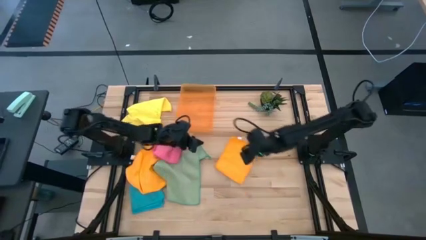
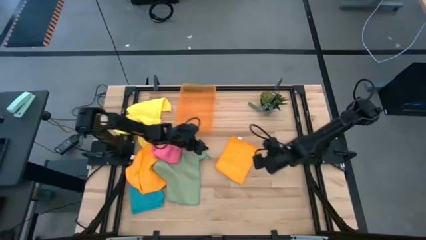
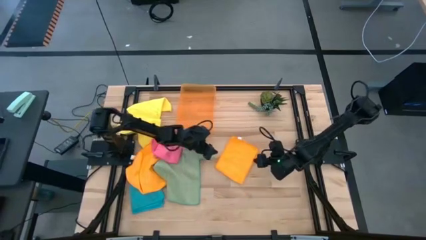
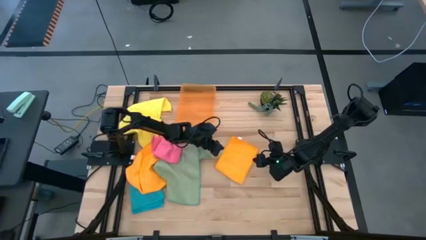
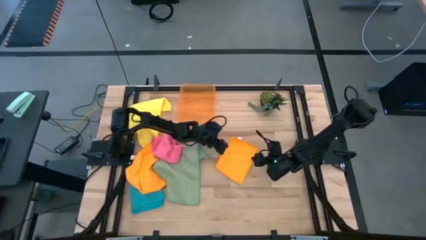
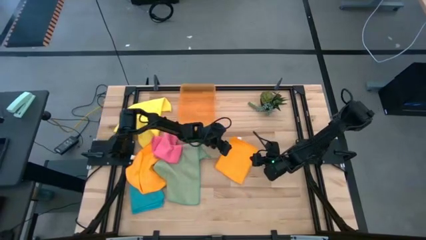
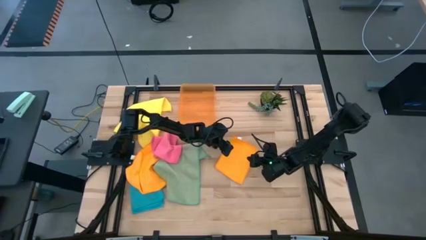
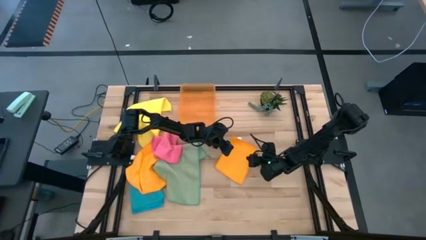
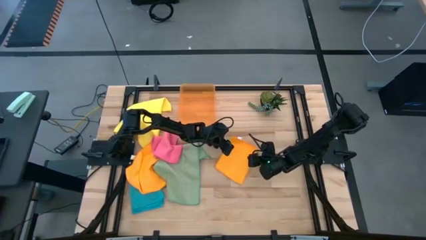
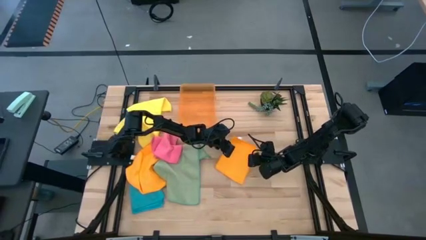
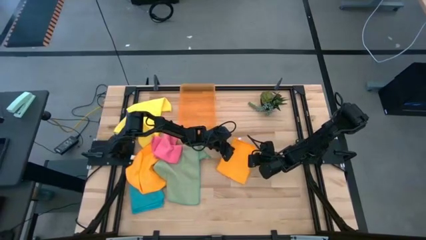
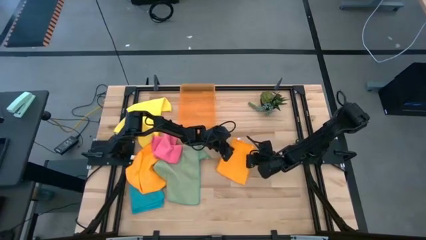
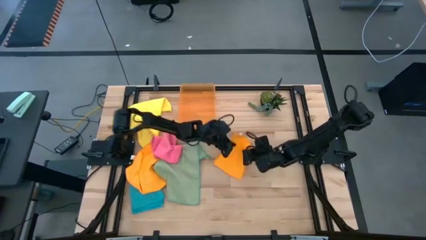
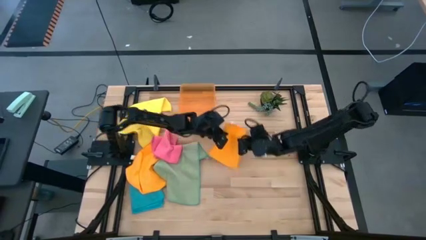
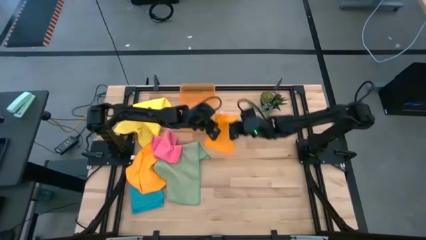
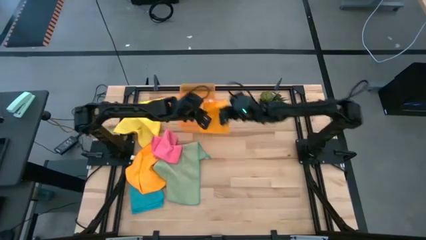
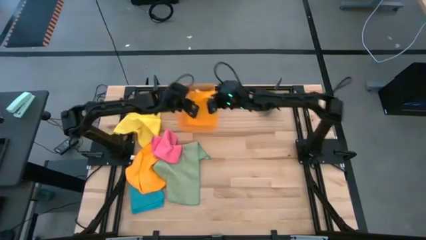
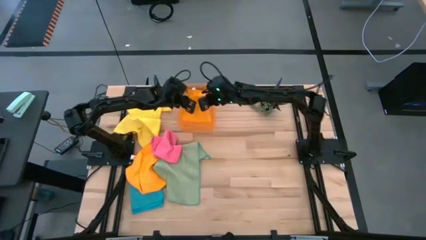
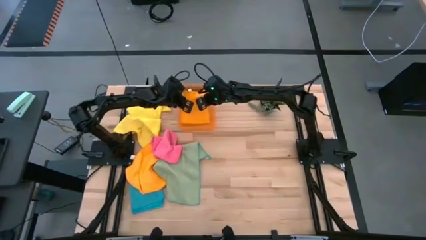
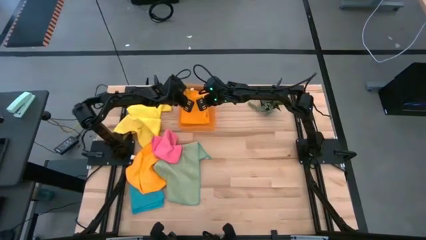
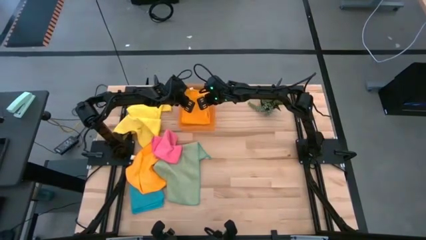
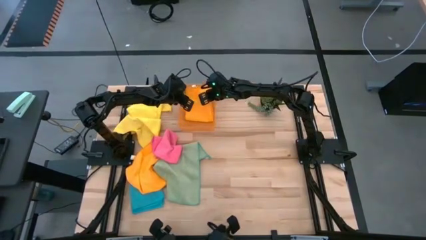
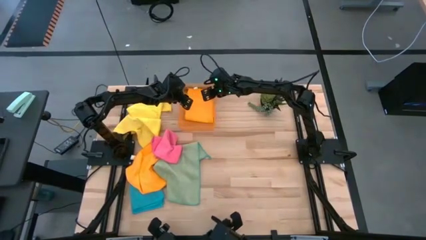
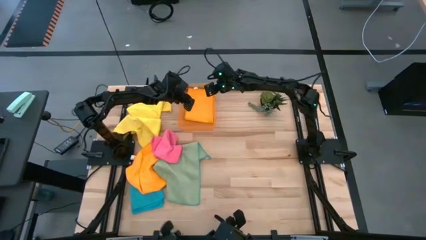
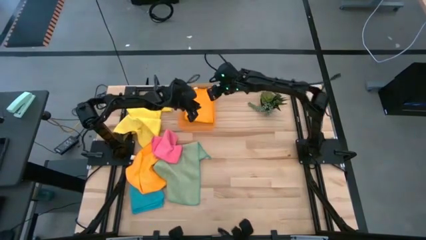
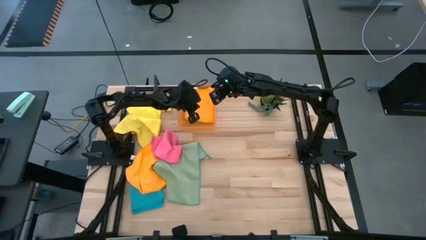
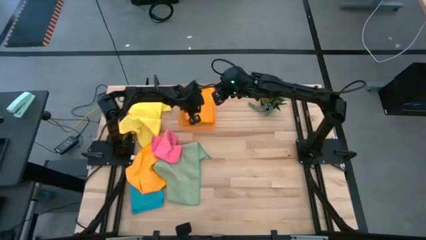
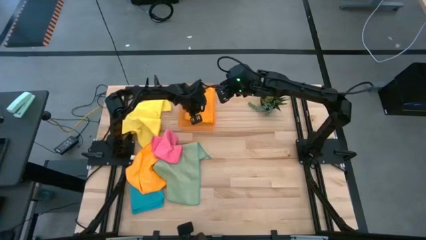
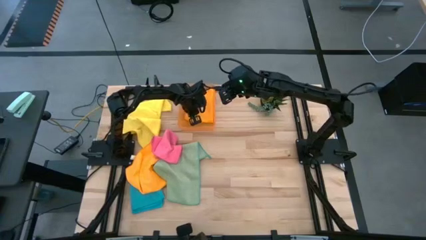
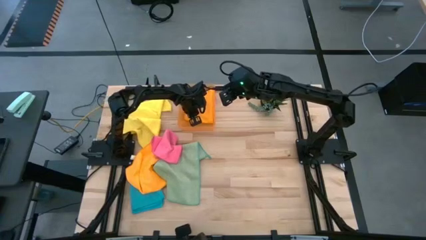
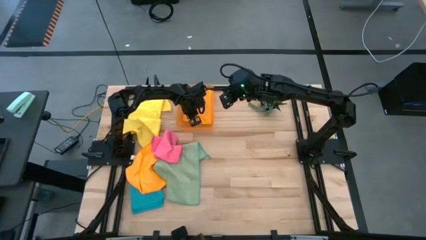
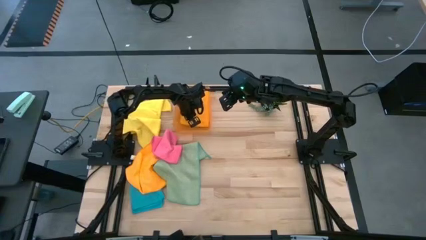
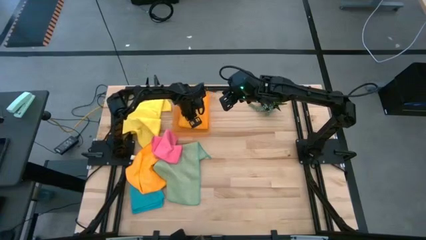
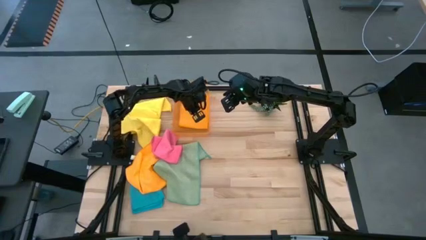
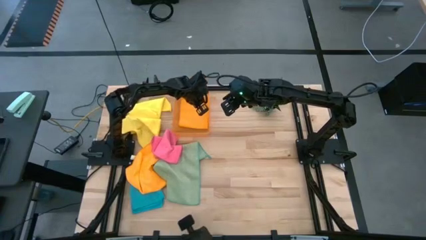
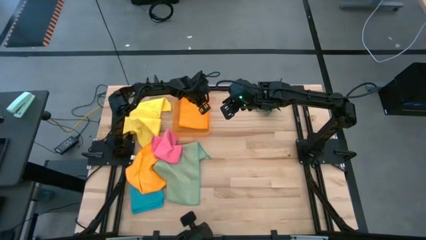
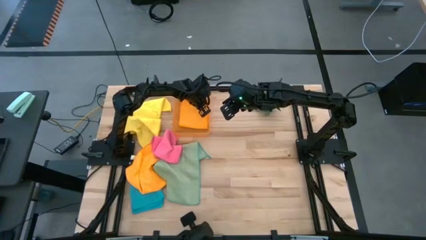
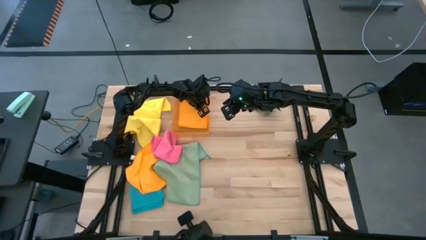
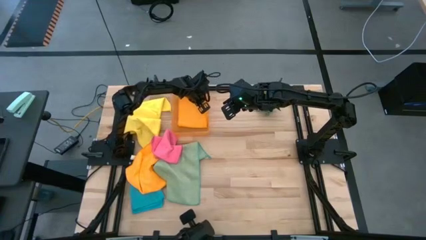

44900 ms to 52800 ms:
Task: Fold microfiber towels
Put the right orange microfiber cloth into the orange bin

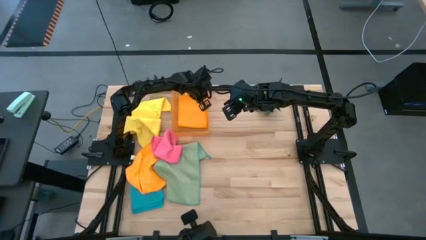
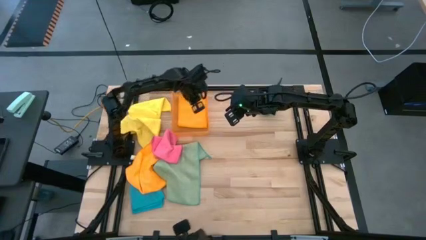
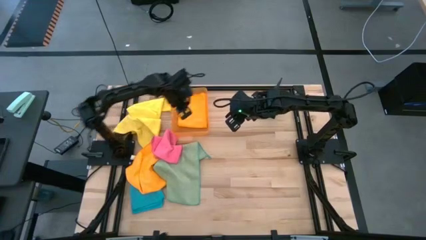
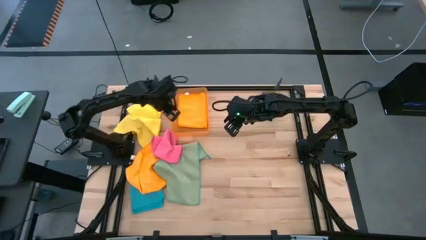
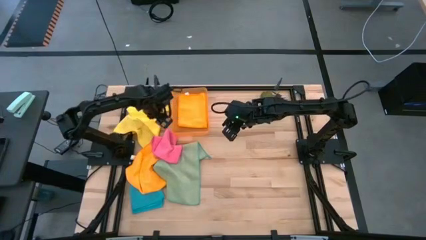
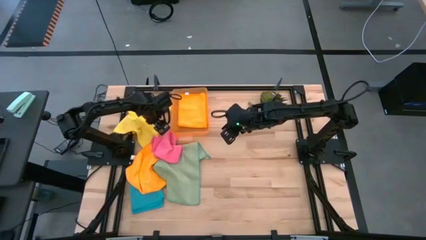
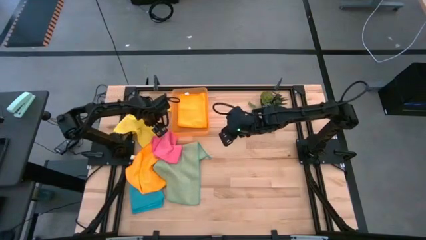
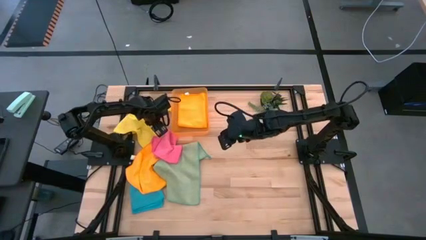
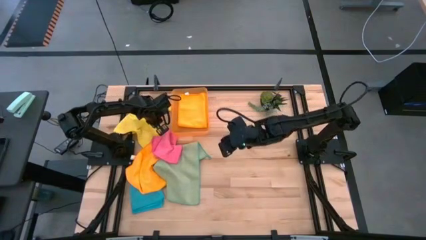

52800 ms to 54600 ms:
Move the yellow microfiber cloth to the center

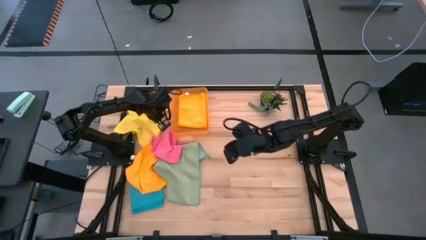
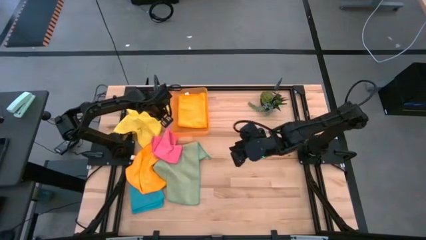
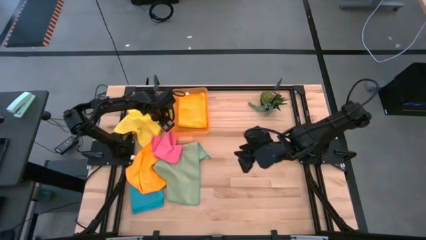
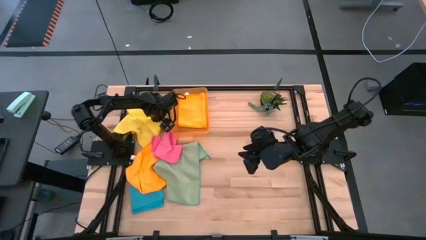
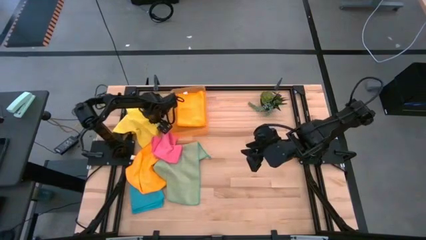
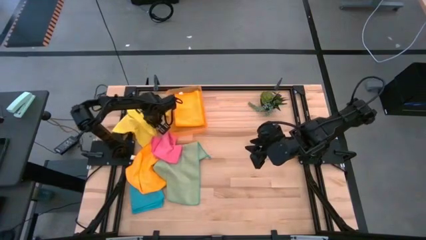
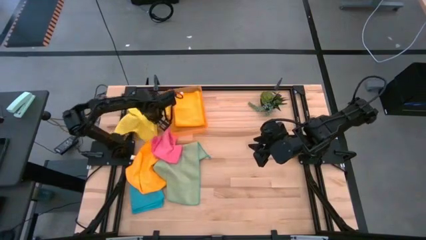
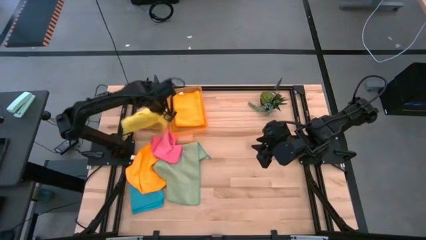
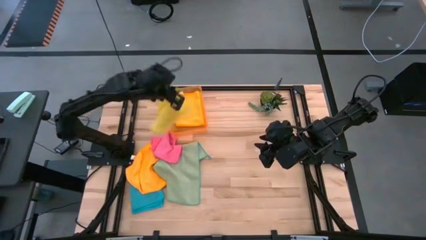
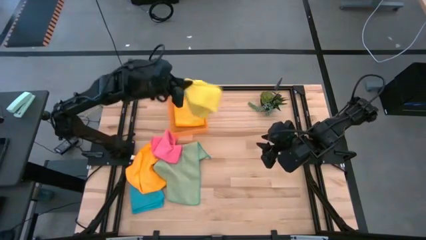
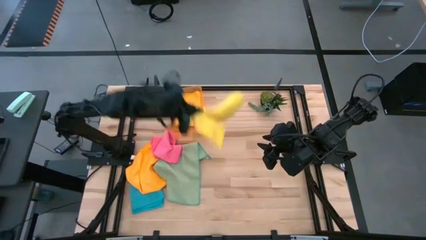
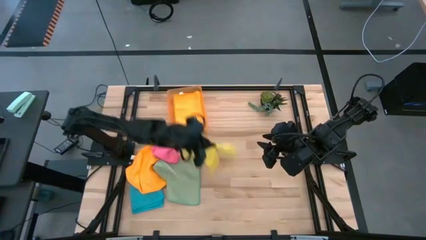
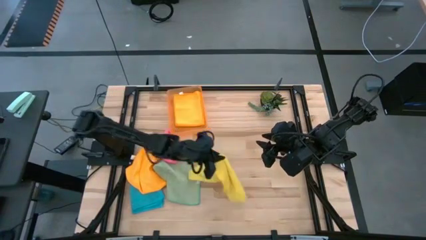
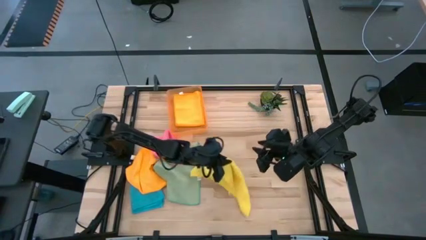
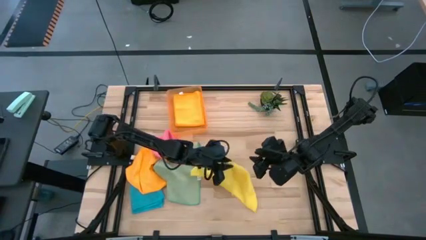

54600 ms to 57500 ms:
Move the yellow microfiber cloth to the center

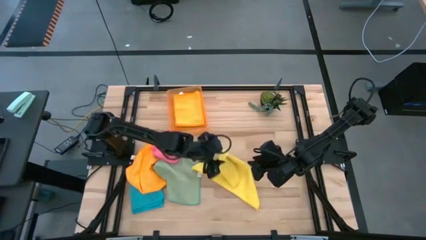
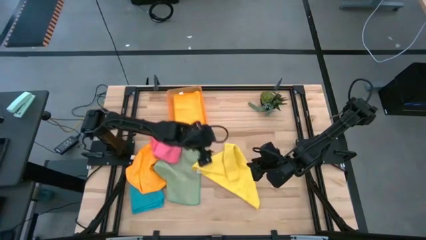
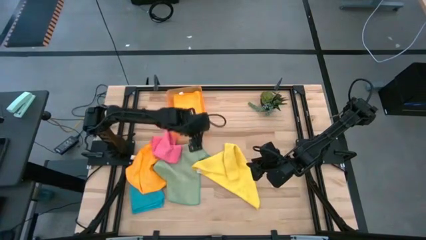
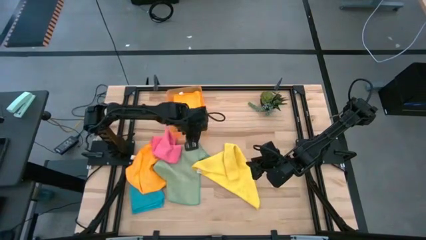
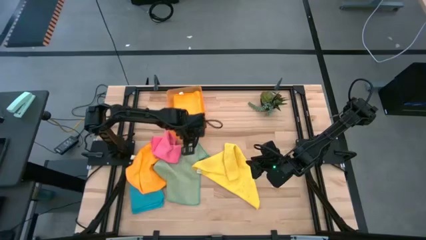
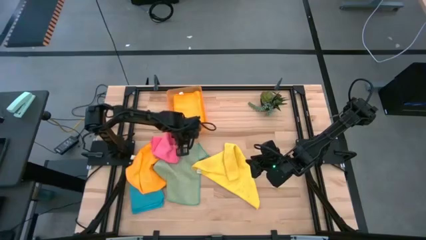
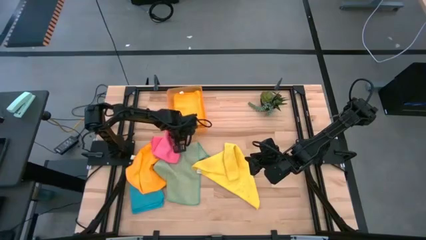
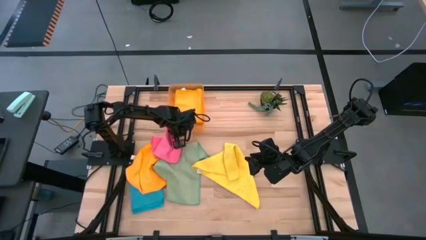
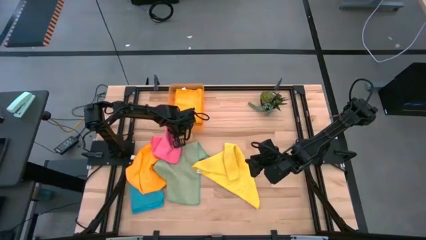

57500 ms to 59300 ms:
Adjust the orange bin
